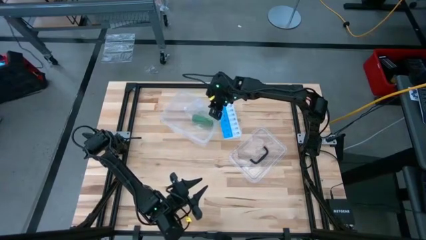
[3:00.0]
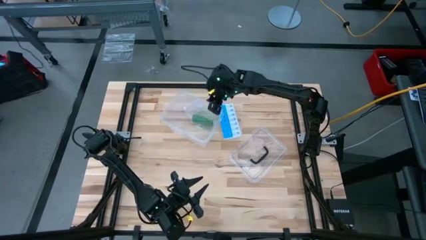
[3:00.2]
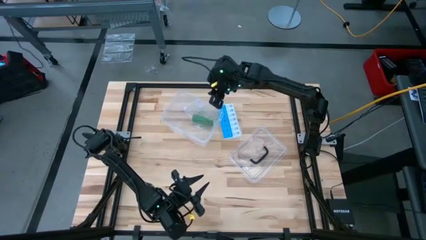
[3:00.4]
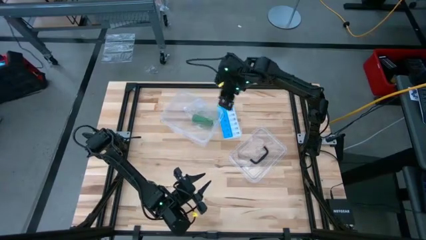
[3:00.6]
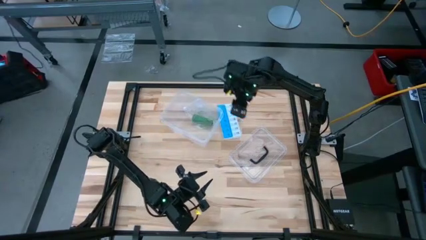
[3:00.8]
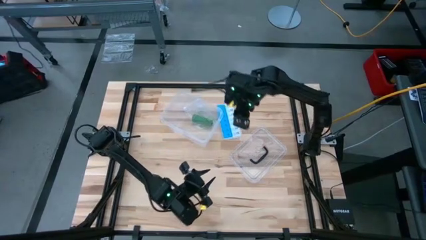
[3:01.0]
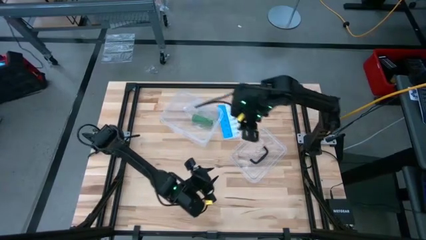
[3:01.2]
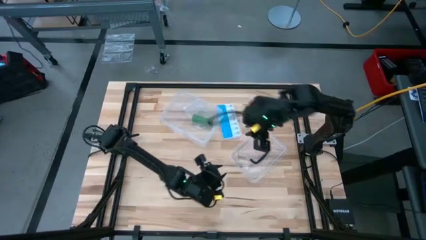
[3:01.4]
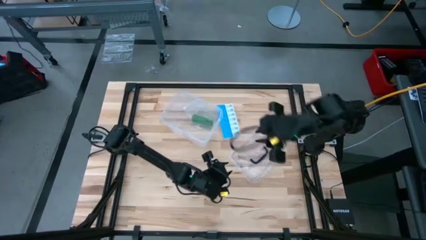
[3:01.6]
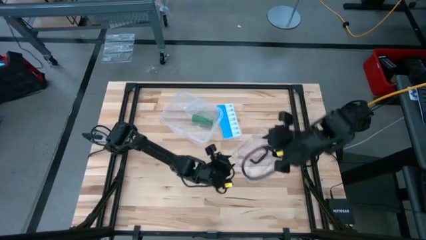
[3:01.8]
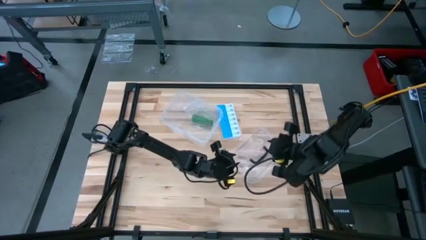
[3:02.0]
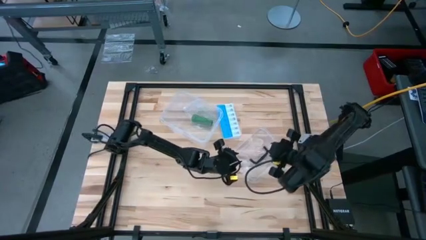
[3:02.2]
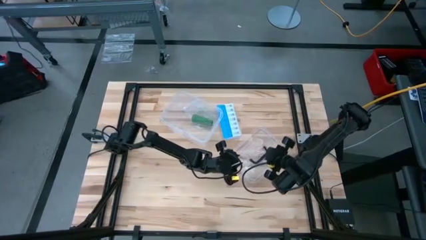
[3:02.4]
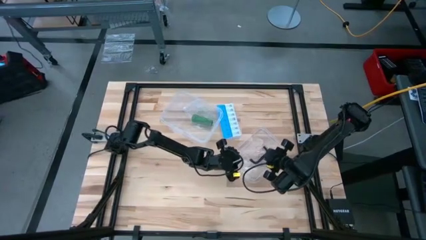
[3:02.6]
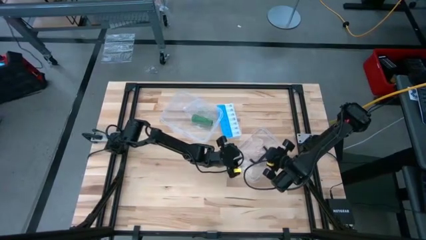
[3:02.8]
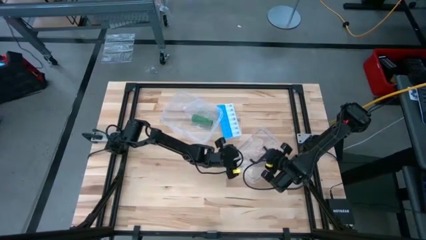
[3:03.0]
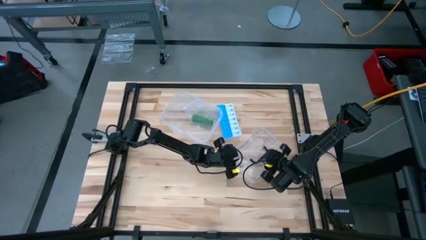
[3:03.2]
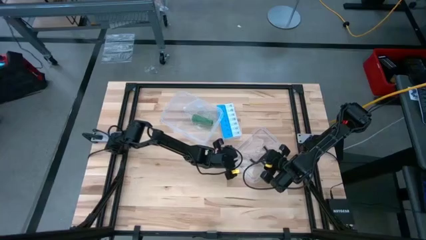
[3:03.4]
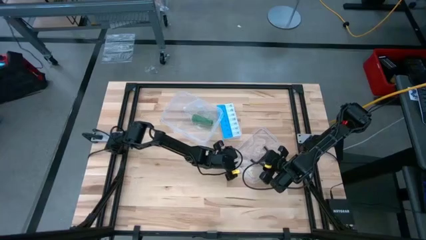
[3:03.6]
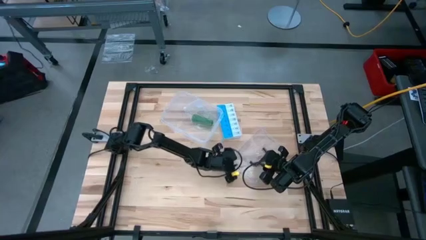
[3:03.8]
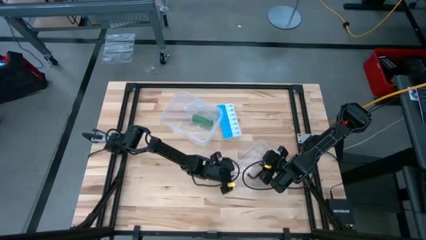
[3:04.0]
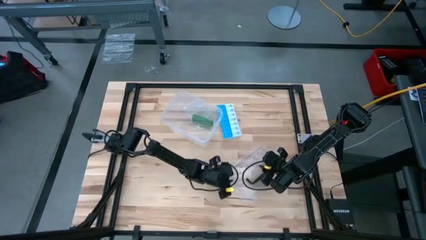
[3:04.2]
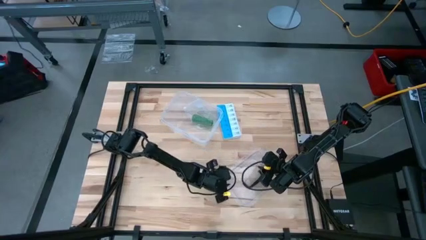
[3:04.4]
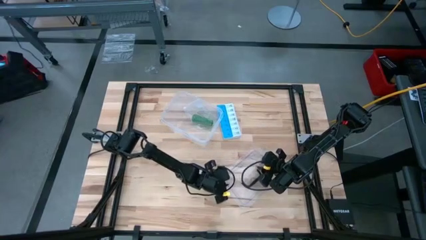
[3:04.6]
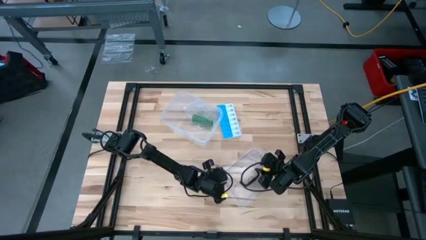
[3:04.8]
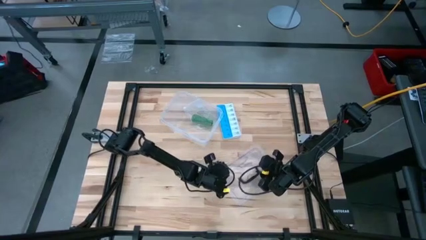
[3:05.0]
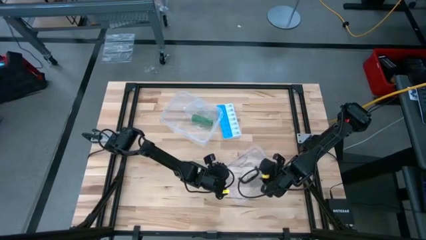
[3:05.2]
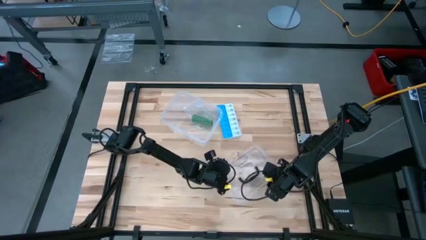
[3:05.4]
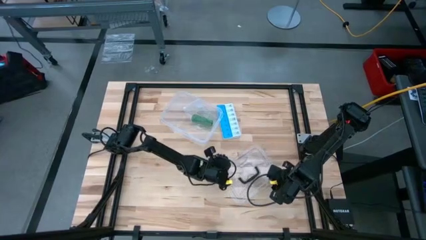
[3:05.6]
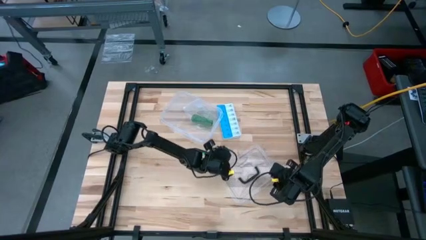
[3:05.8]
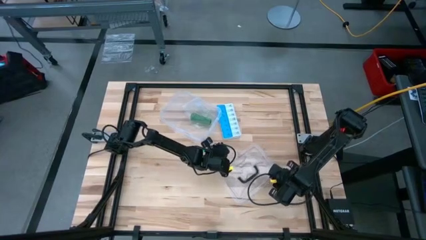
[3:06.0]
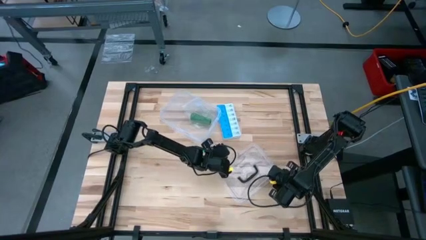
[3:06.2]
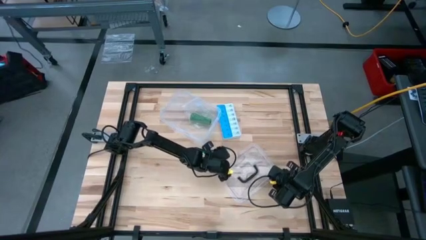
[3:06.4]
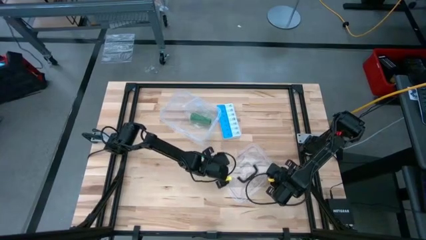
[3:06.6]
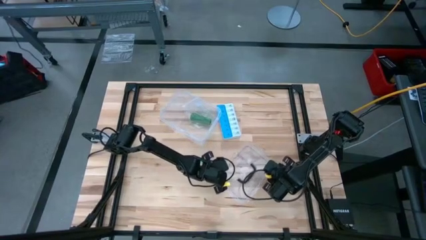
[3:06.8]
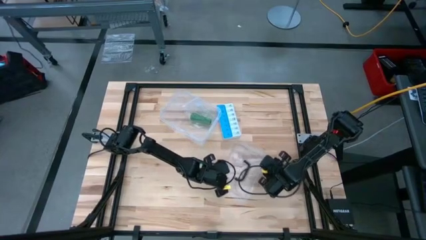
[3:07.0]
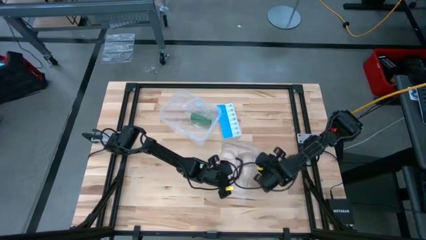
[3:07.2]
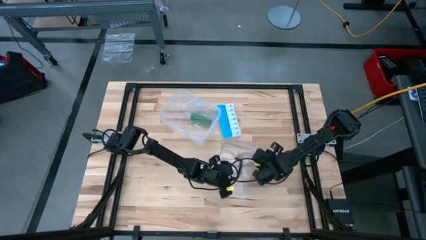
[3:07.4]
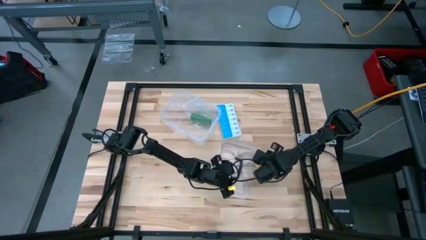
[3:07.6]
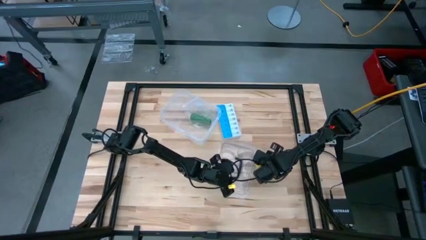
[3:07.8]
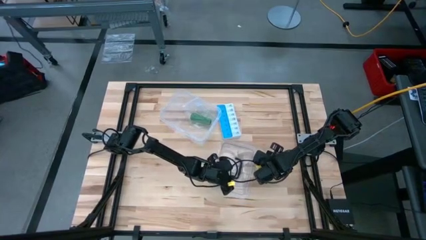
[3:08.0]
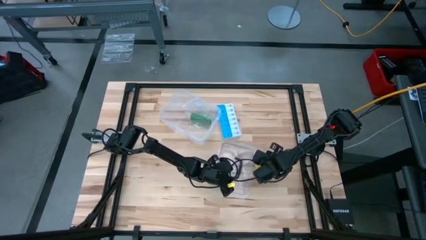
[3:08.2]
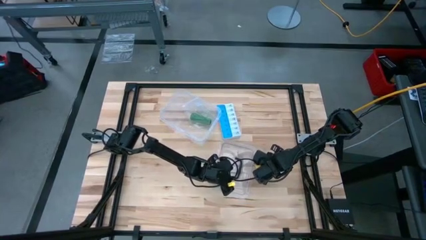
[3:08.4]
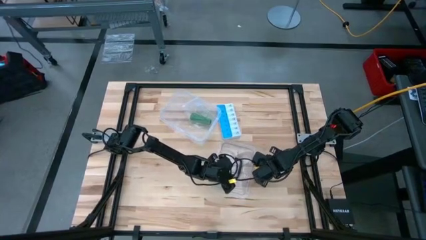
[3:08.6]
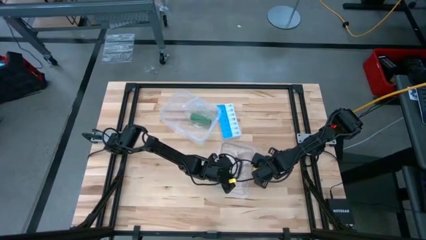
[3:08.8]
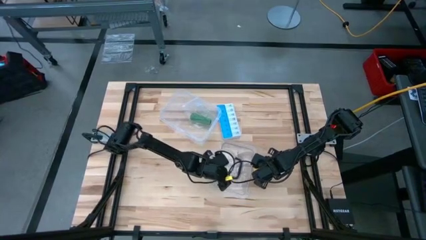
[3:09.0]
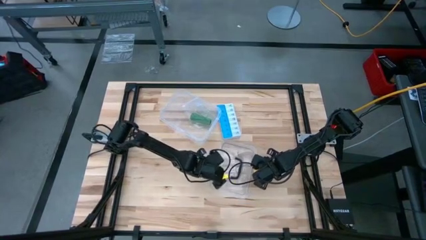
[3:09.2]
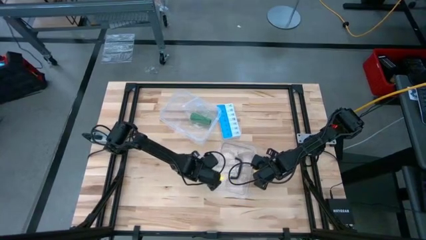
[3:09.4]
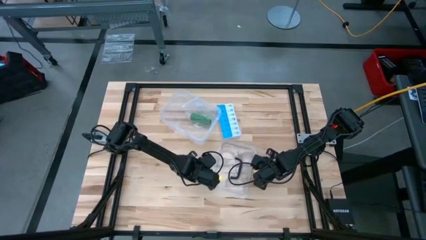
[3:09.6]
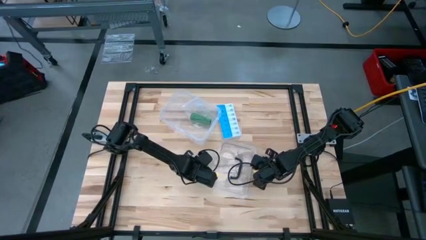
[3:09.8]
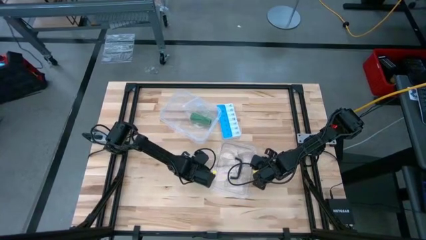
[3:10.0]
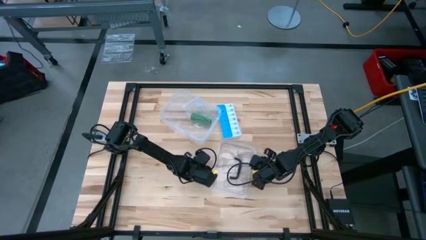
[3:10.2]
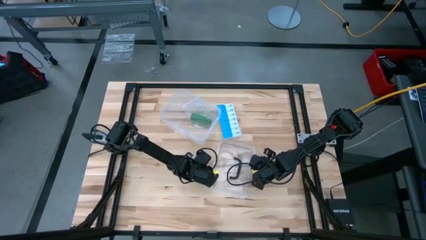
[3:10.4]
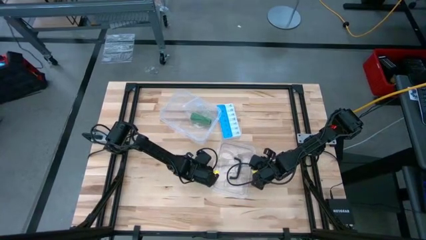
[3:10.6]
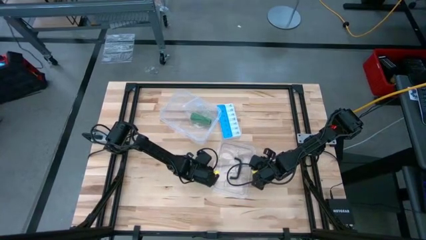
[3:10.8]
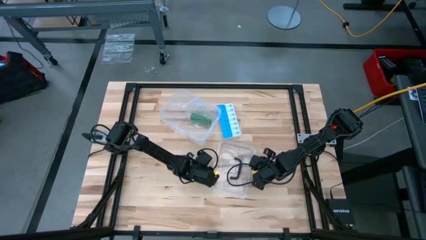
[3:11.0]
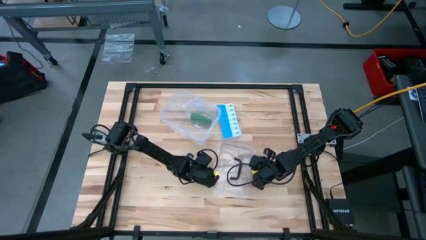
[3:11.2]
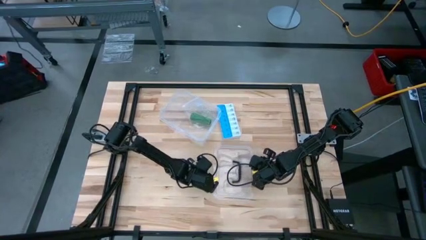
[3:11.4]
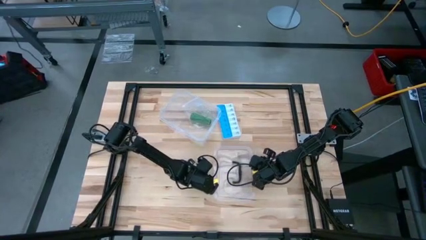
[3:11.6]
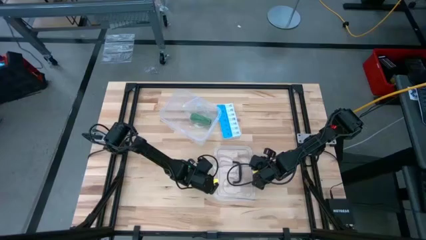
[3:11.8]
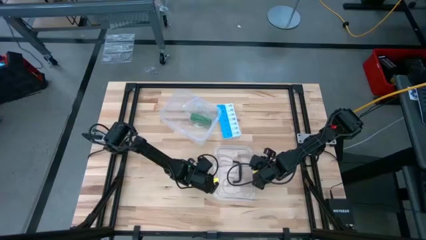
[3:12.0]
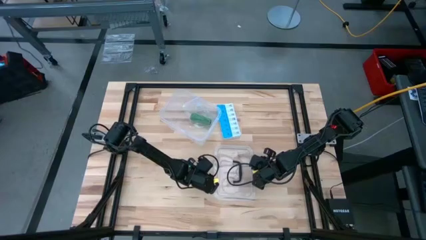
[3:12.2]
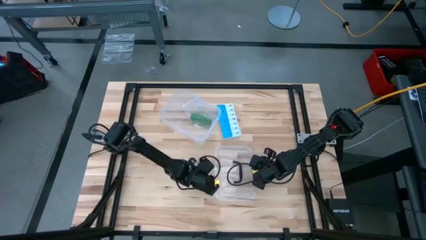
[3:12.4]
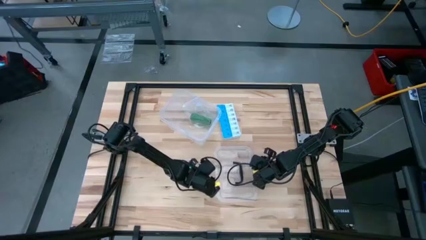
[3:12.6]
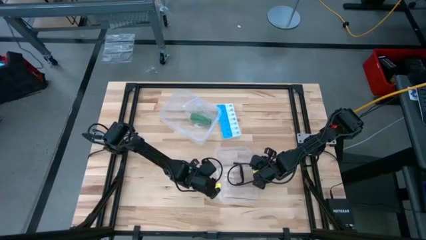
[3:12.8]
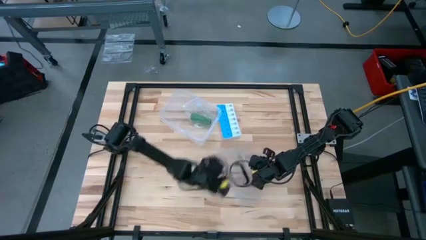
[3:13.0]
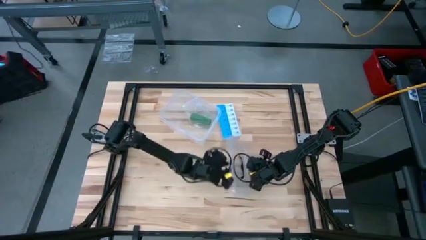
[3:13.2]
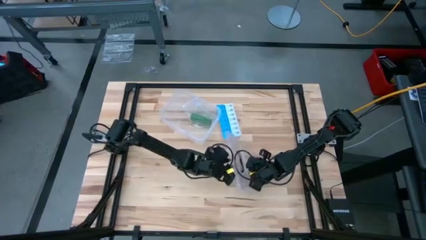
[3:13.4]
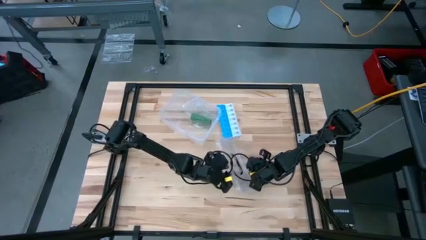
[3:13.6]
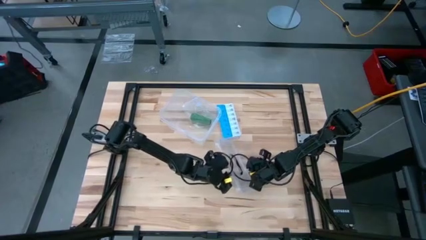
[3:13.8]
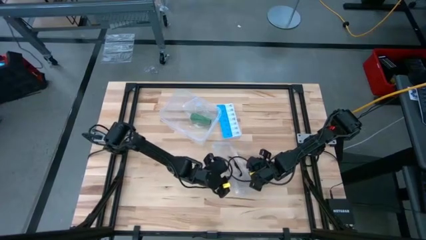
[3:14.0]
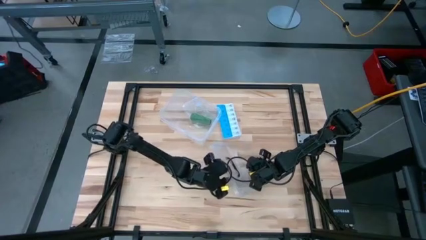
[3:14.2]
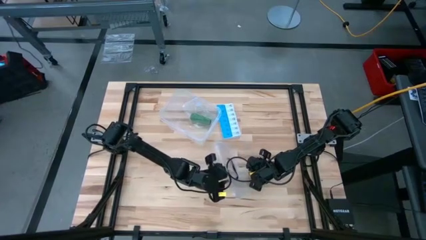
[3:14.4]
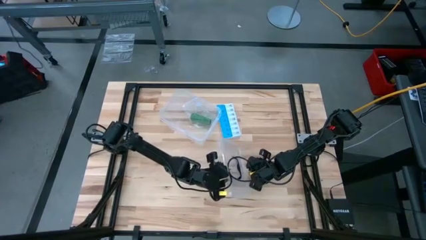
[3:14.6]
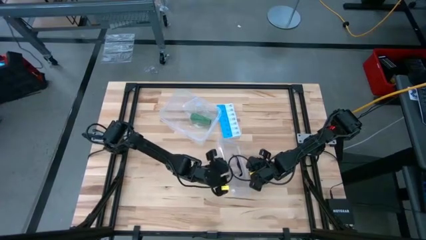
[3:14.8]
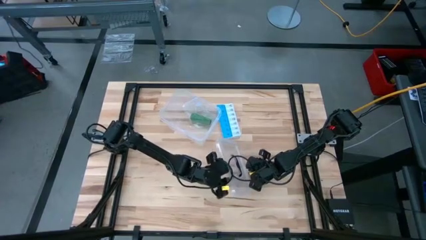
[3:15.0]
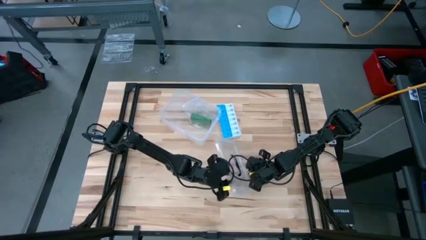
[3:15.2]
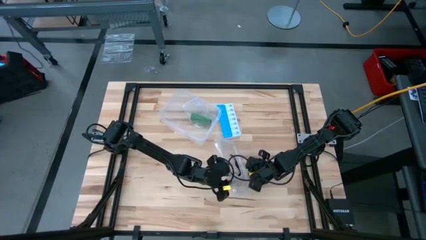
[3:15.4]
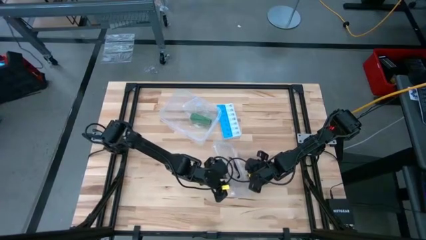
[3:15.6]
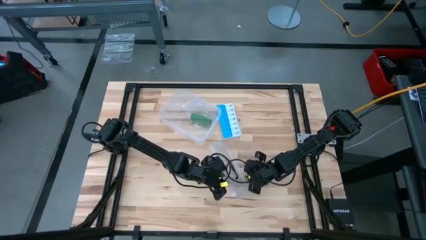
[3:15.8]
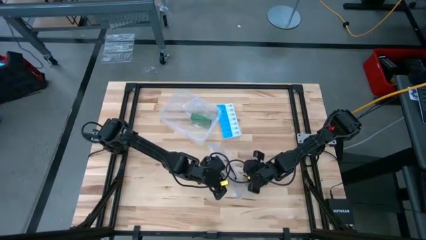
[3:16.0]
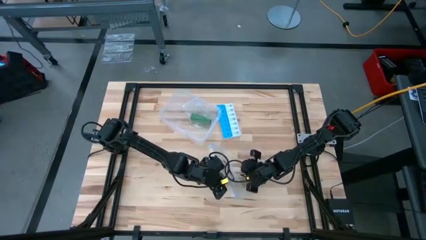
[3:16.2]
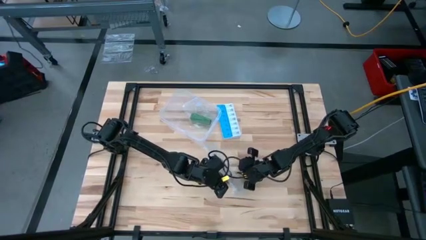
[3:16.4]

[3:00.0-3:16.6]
Task: Roll bandage
Close the transparent bin
